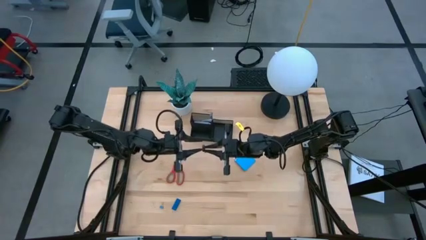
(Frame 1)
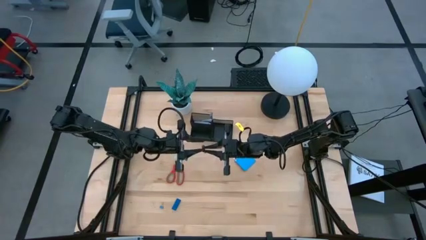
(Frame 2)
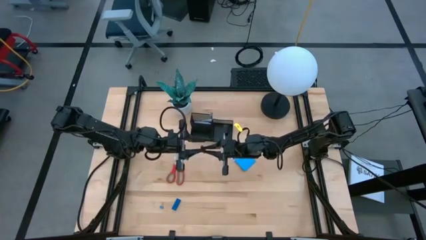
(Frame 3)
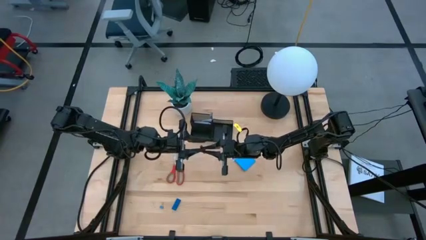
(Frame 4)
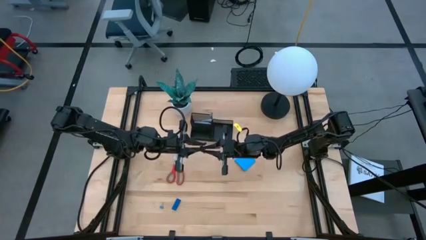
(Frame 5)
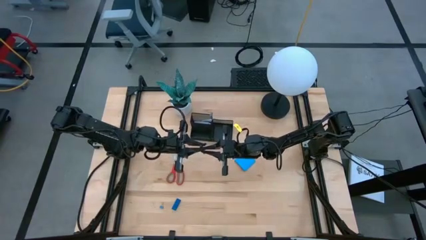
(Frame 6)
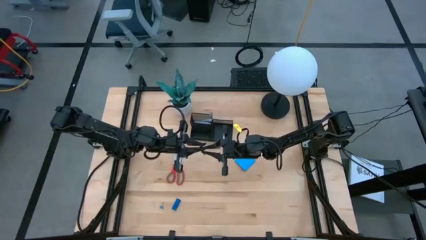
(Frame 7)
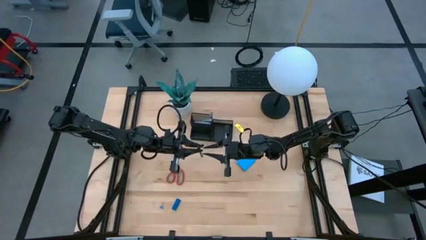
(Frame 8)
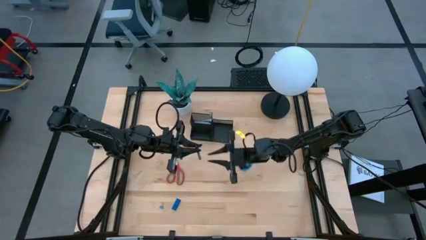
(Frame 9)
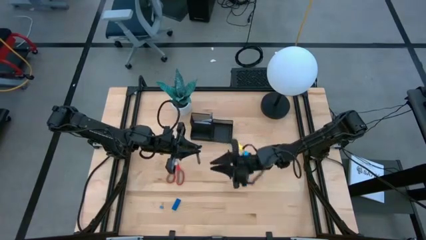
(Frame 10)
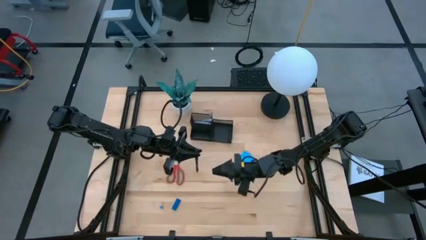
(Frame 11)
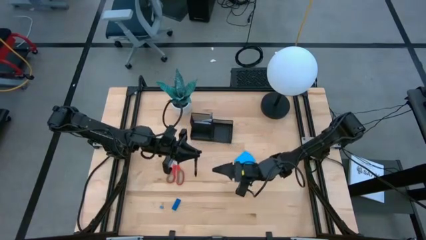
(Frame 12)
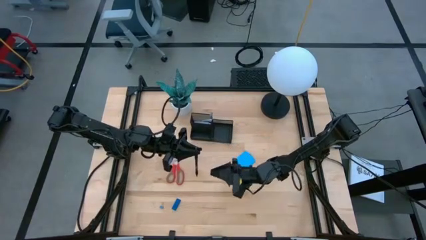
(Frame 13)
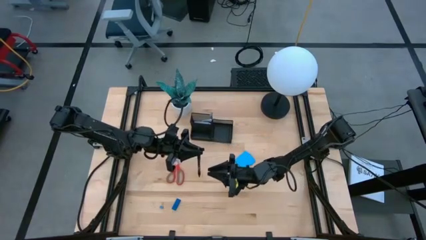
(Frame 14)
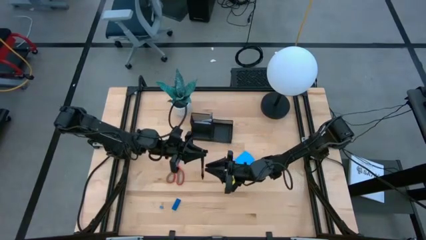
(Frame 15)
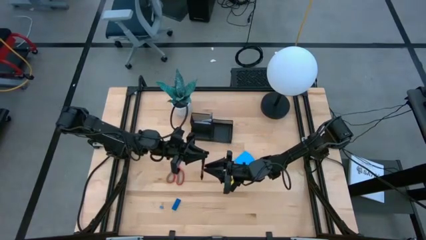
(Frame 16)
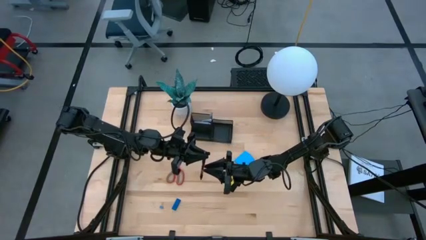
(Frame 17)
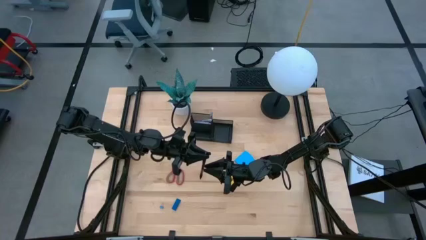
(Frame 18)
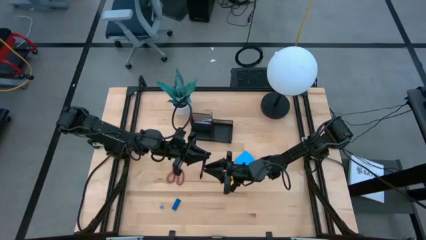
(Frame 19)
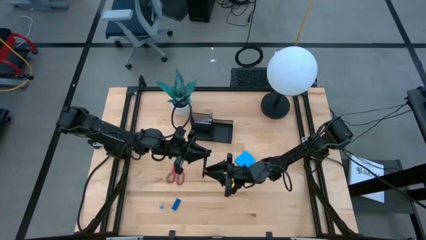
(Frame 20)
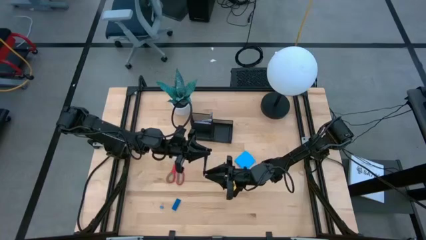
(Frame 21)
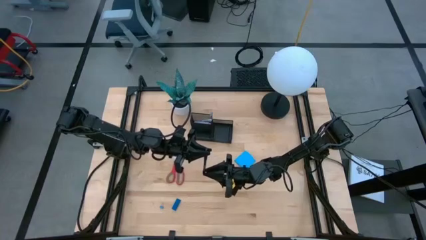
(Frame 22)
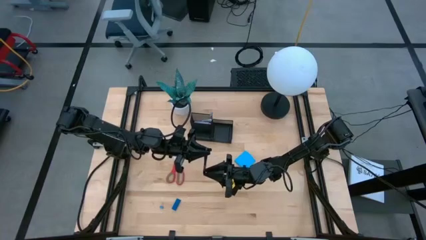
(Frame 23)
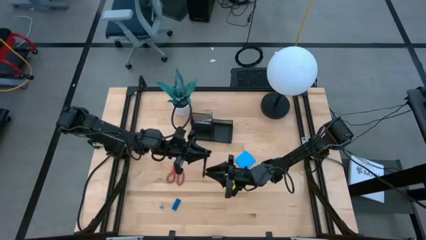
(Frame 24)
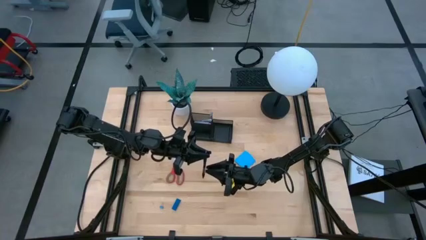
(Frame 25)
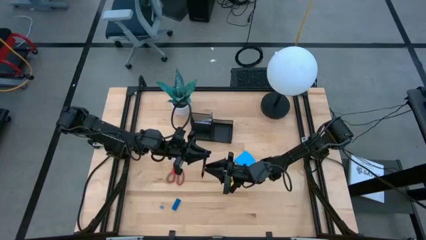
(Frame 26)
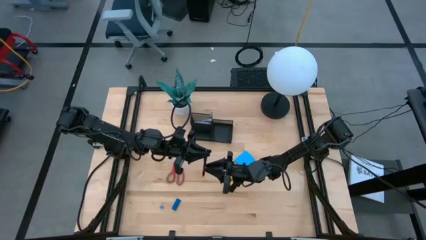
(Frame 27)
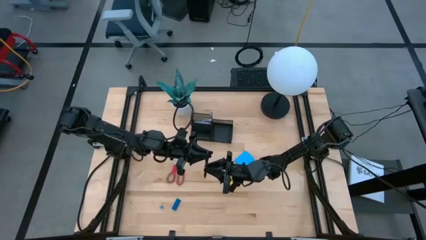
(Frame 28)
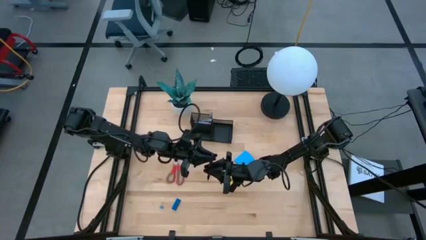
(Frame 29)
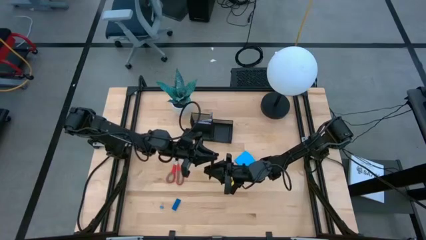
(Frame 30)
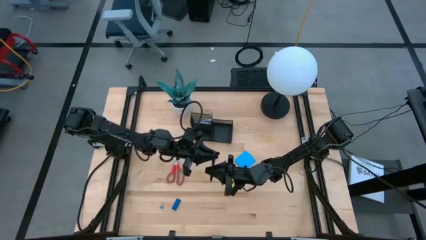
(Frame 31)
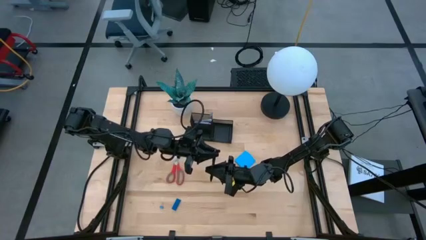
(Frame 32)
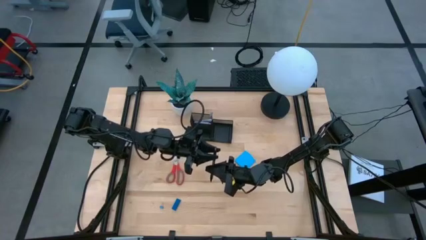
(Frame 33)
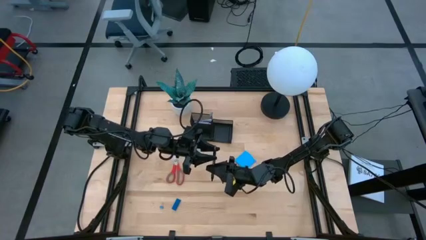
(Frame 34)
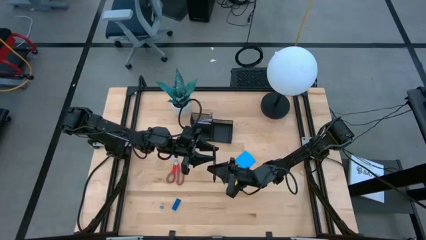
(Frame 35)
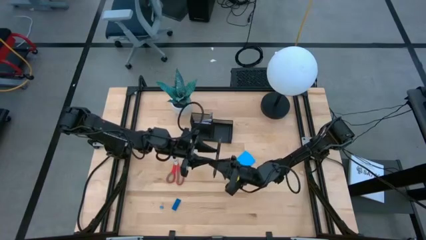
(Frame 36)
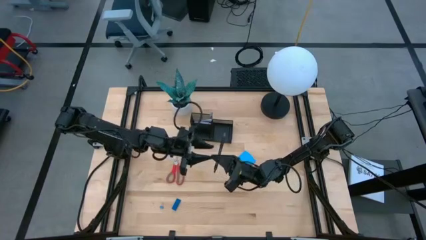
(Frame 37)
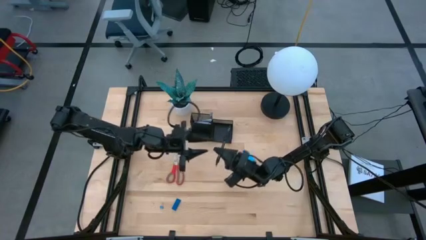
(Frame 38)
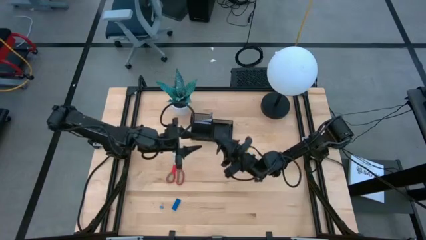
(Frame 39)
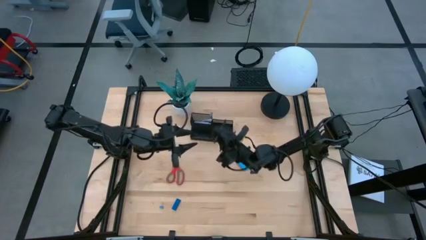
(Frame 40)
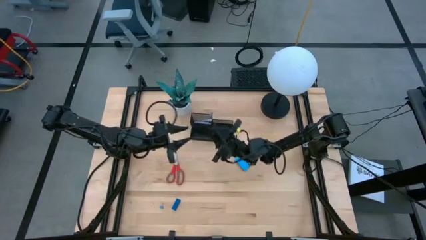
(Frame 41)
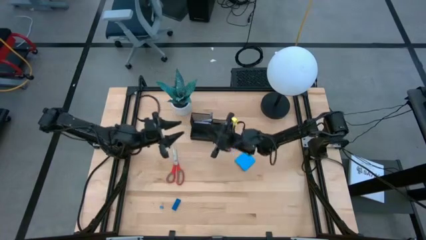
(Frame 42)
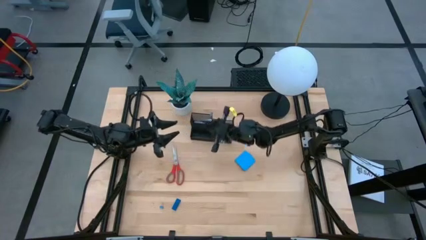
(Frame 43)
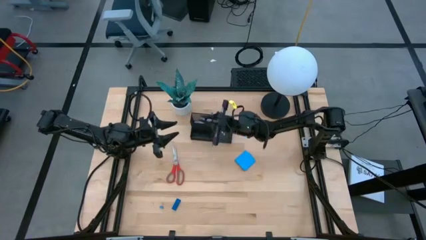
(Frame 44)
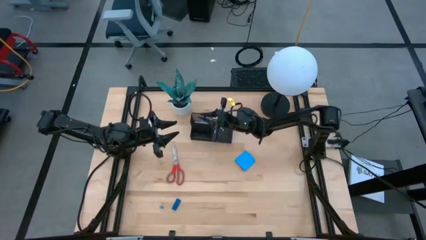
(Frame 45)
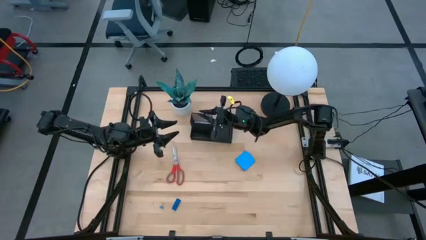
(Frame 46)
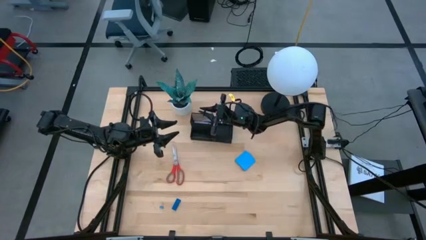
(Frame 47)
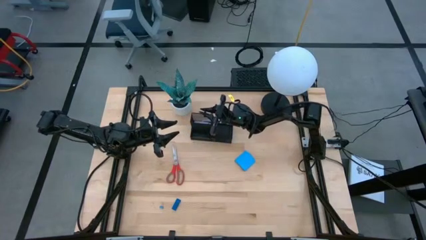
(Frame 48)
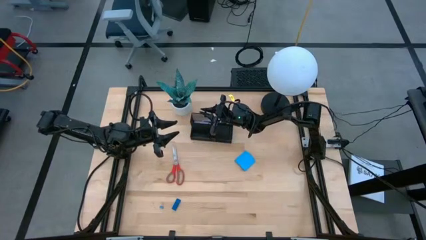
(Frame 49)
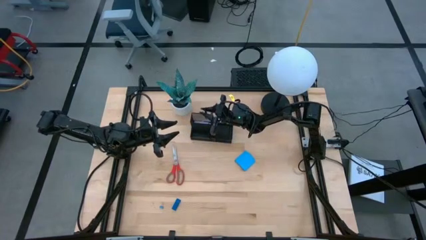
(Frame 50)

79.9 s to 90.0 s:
Task: Pick and place office supplies into organizer
Put the black pen into the black desk organizer

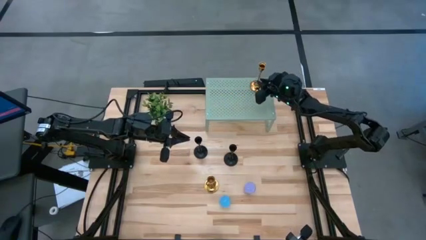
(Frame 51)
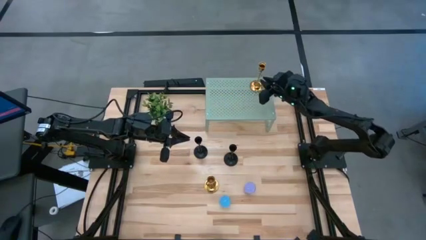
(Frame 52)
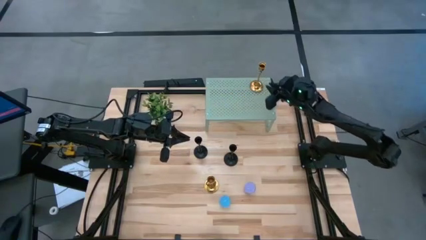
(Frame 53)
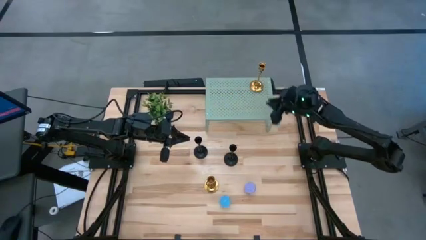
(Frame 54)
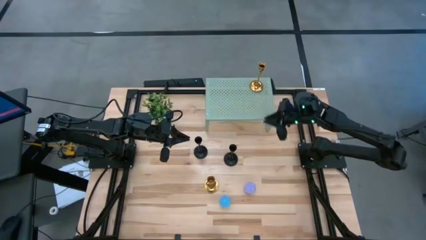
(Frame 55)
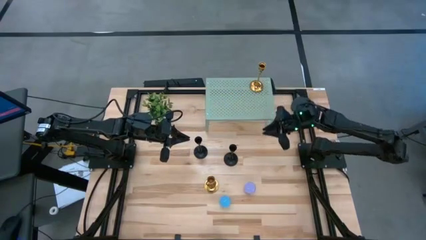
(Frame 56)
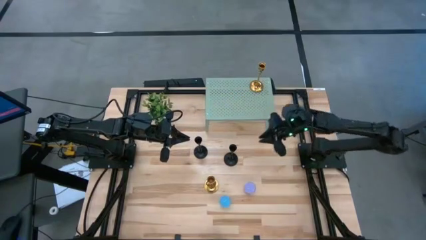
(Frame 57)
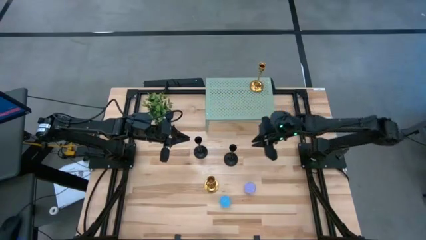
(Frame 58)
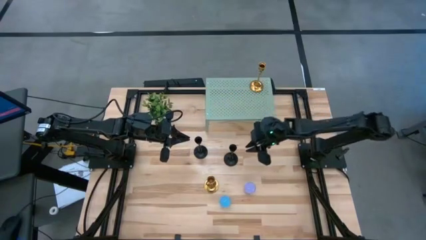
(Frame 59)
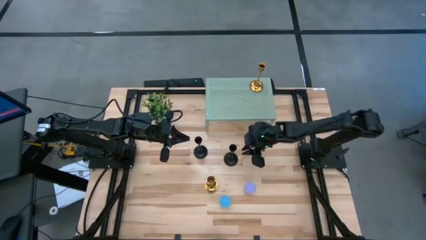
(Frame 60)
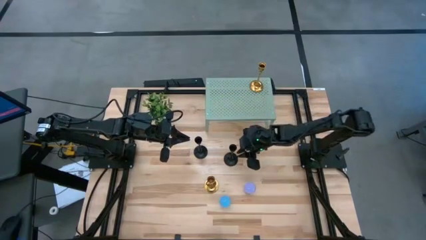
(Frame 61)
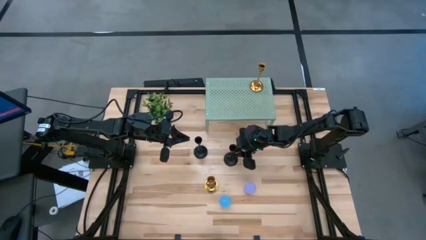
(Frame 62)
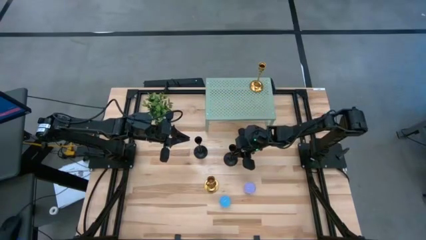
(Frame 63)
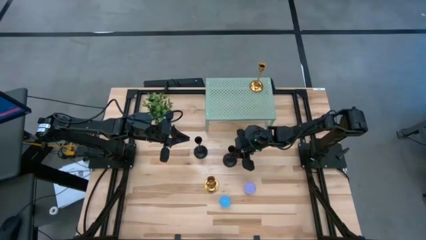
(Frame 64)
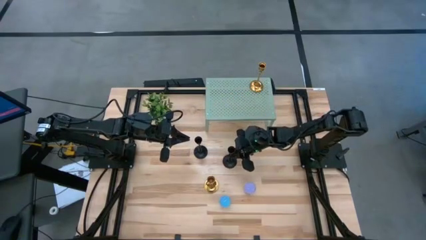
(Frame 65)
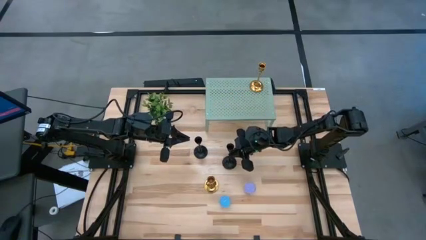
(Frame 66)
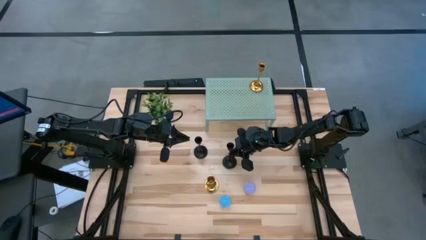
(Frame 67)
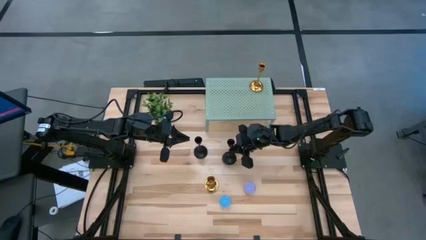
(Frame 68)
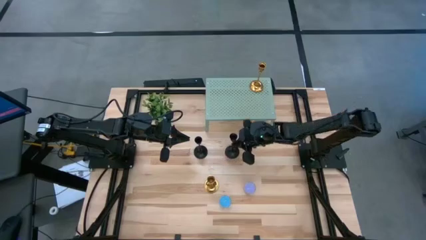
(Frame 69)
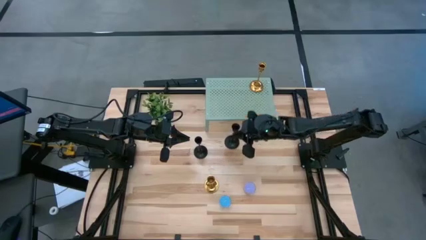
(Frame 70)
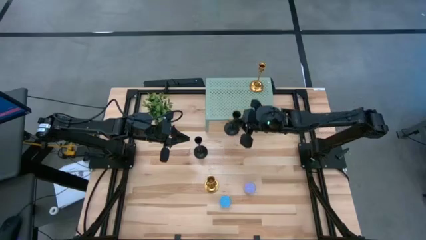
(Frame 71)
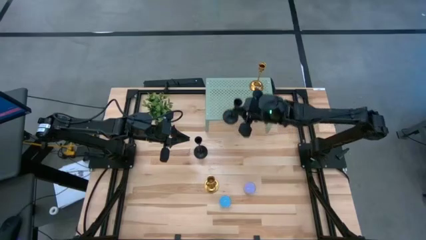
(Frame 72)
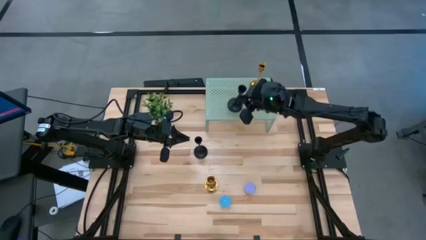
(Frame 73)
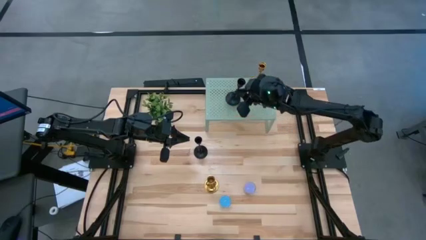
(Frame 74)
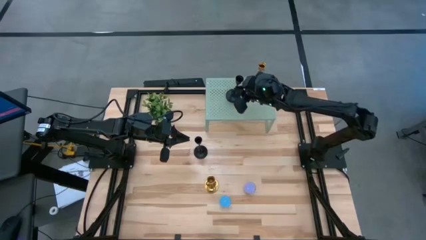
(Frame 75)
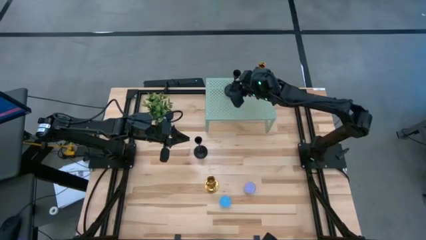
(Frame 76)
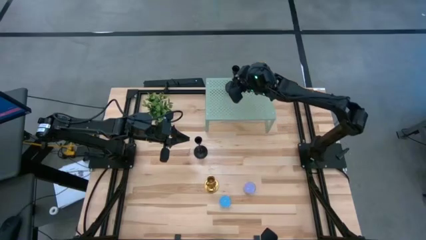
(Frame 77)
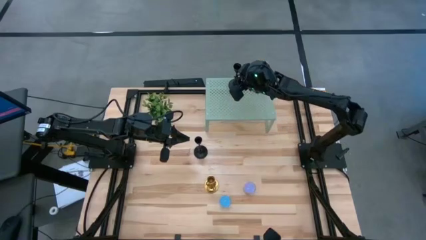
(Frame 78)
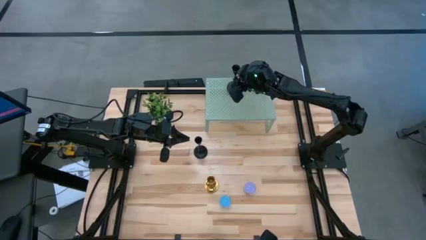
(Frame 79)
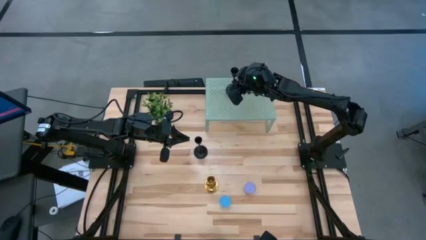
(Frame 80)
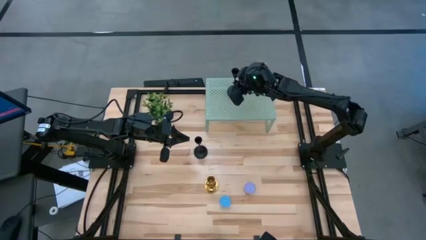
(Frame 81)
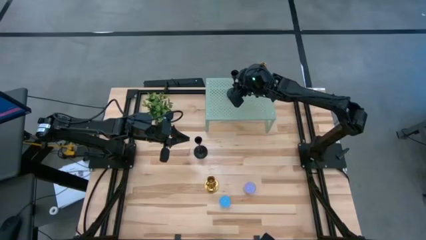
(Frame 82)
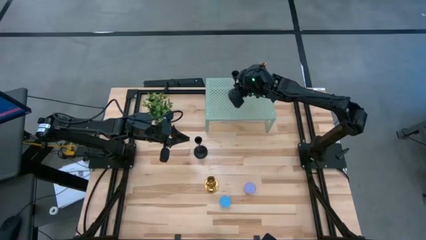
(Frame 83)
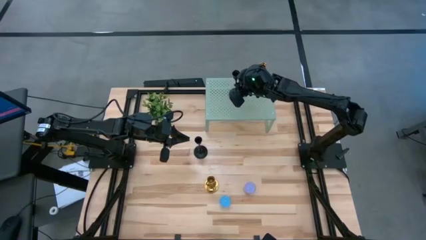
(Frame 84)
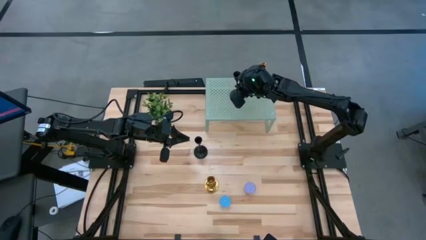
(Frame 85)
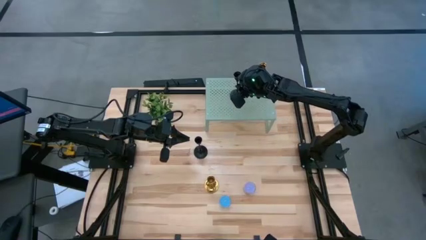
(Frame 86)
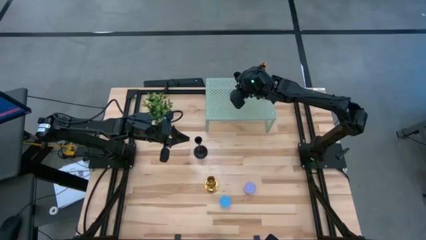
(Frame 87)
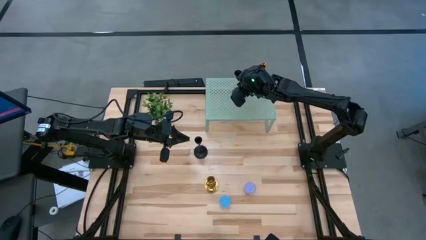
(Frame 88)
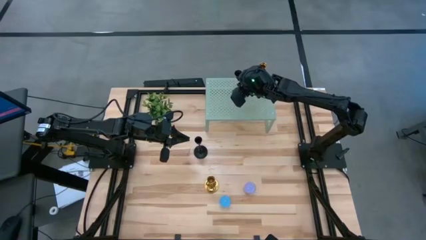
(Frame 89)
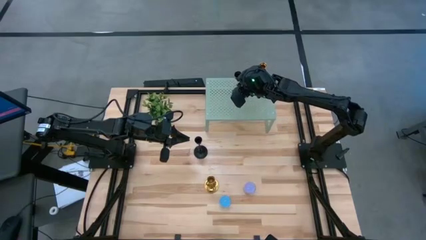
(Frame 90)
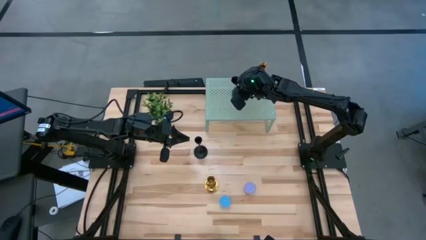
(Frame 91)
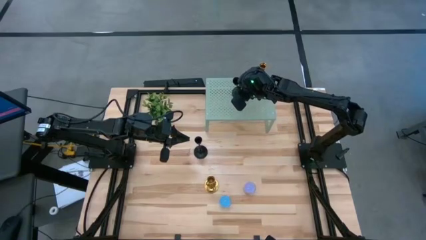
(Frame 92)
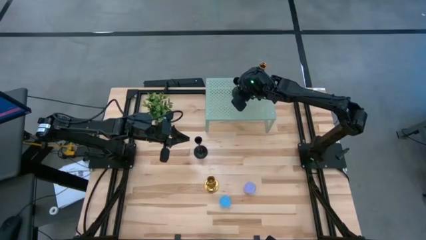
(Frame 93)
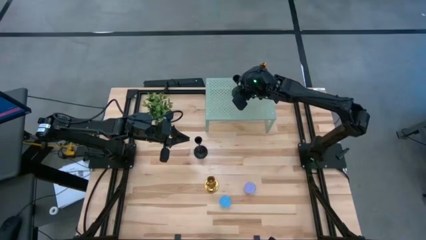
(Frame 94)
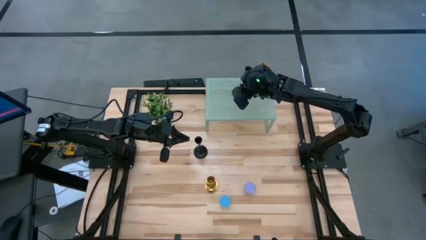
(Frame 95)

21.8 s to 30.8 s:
Task: Pick & Place candle stick holders
Put the black candle holder on the shelf
